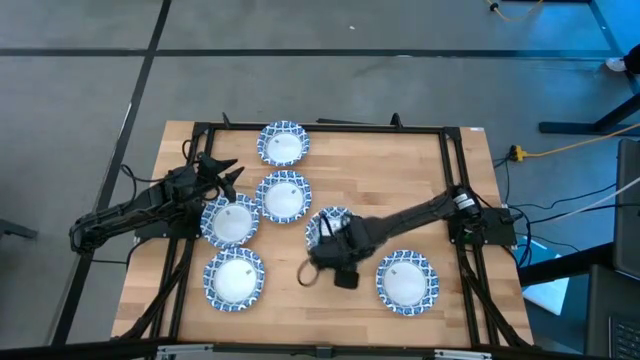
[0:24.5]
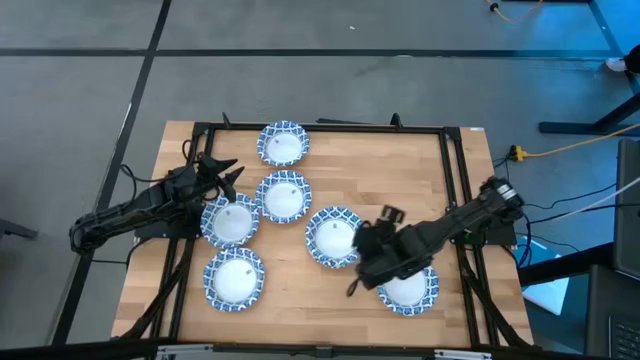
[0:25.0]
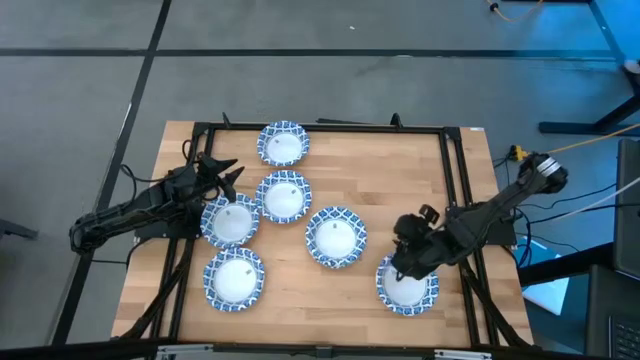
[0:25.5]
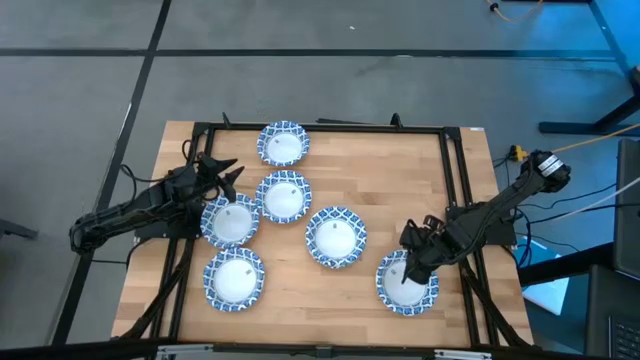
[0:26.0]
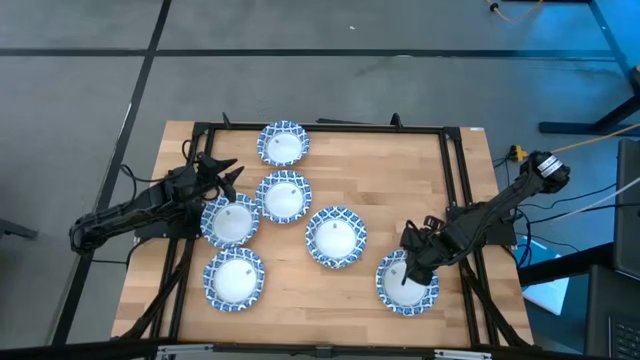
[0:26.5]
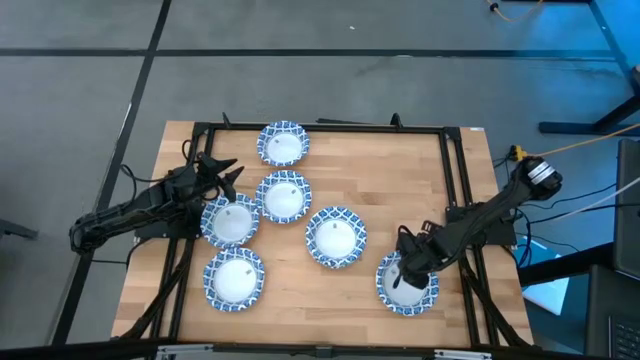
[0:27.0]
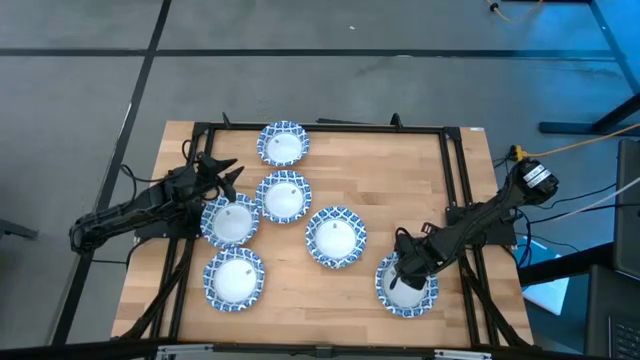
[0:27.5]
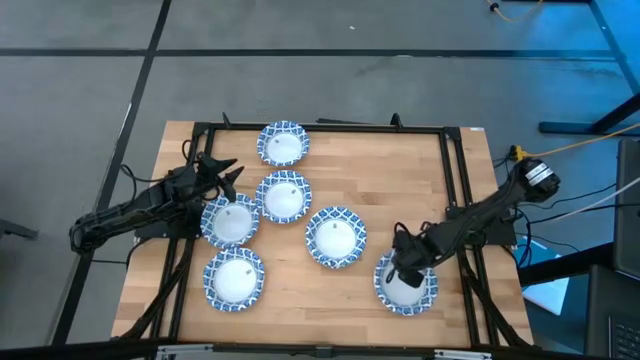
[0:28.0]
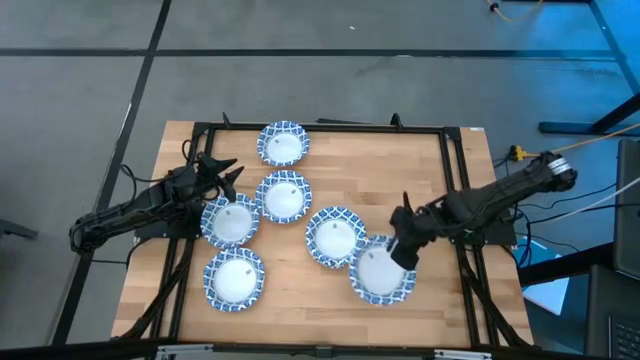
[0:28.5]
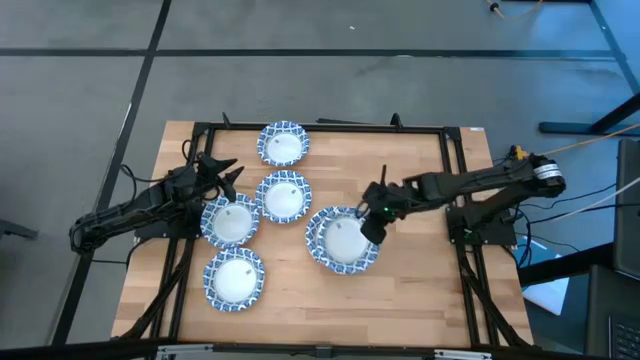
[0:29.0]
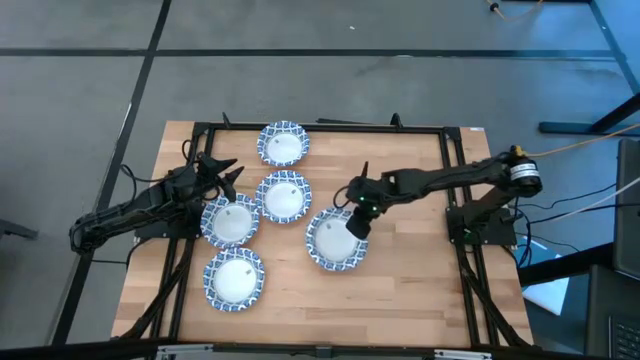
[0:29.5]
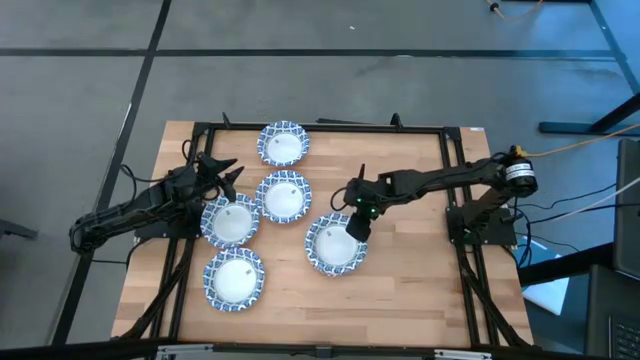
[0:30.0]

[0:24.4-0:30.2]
Task: Nest bowls inside each other
Stack the white bowl on top of the other white bowl

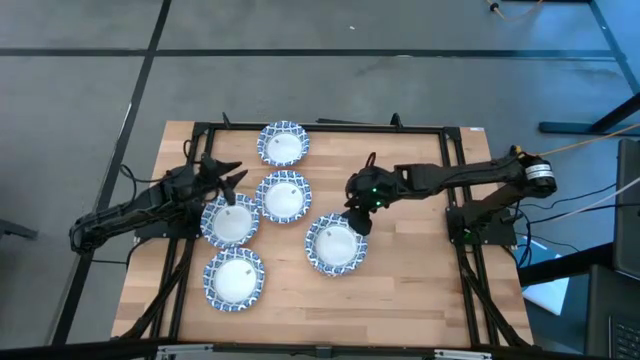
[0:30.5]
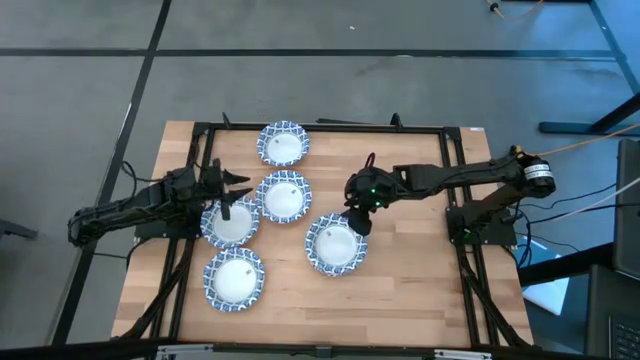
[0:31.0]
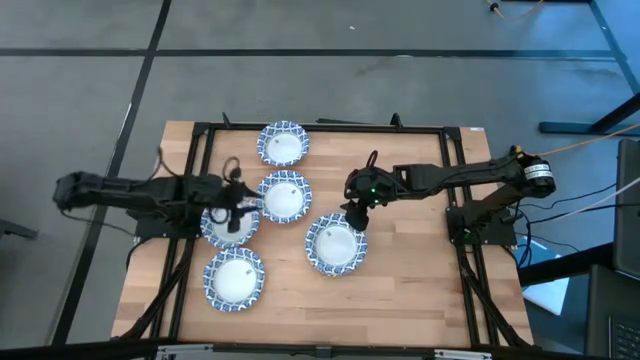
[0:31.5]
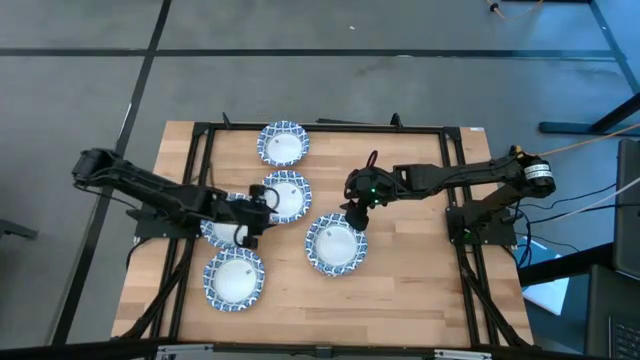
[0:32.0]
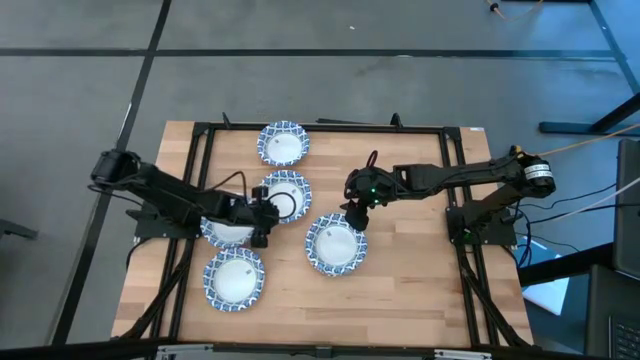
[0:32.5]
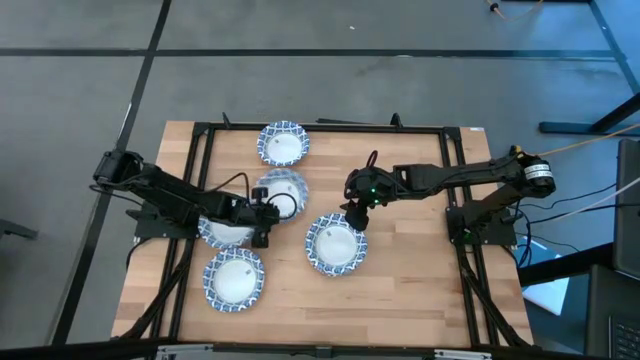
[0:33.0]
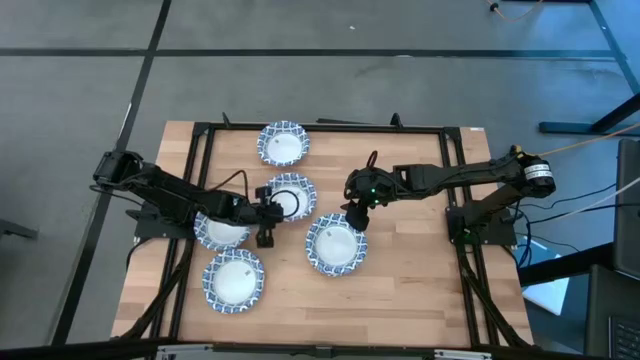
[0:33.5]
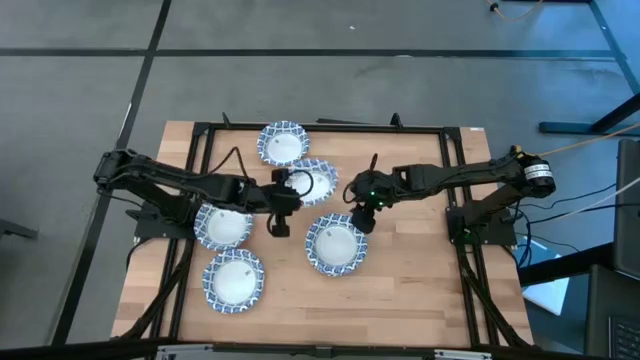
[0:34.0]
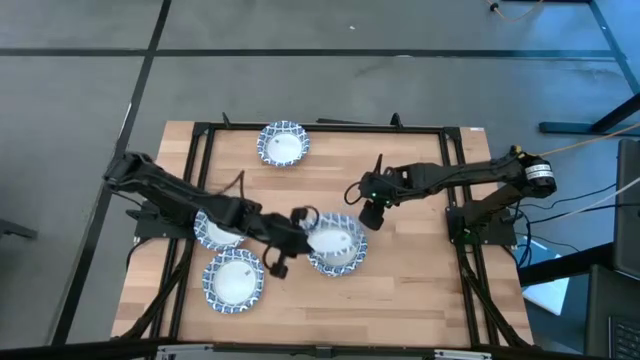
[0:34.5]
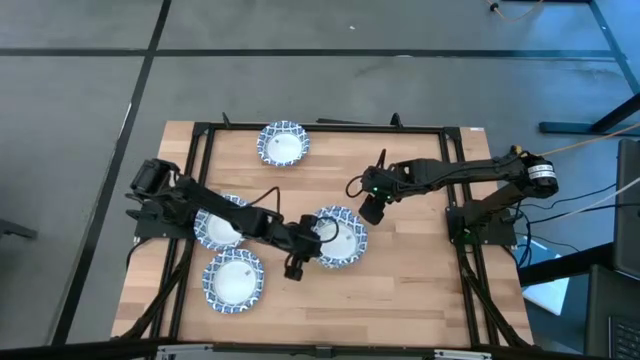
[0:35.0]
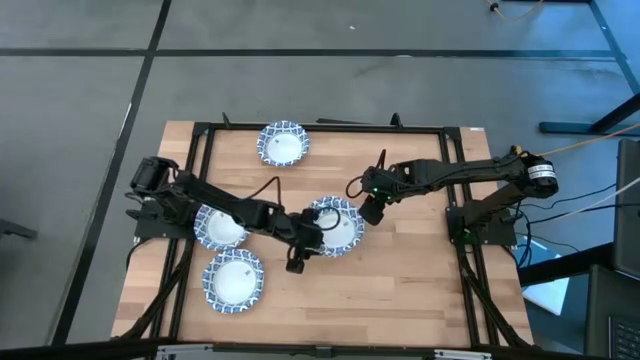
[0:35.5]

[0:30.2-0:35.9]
Stack the white bowl on top of the other white bowl

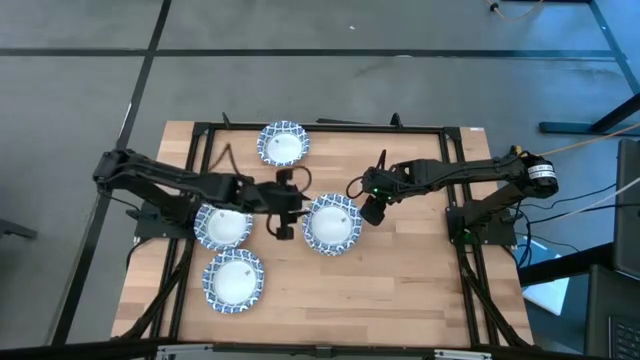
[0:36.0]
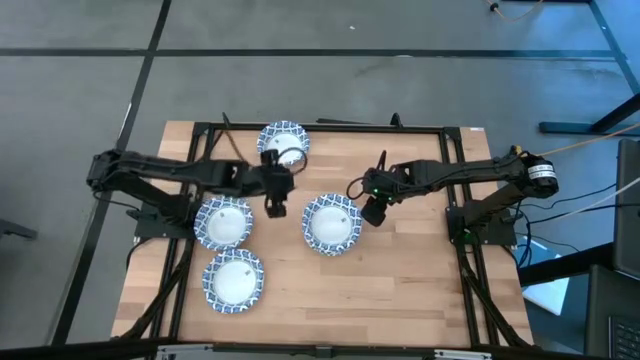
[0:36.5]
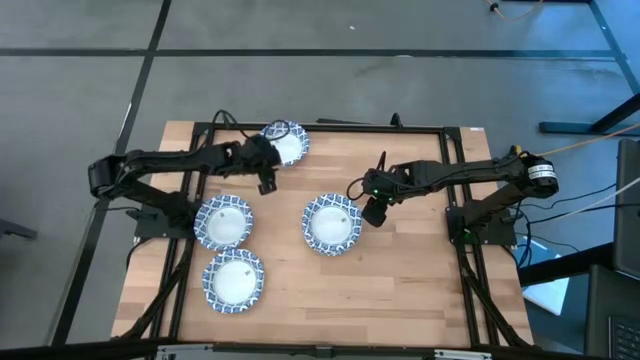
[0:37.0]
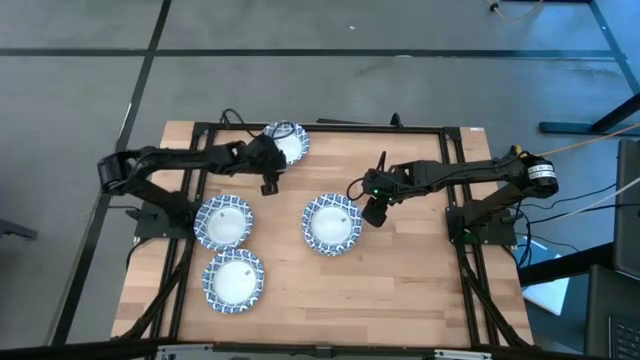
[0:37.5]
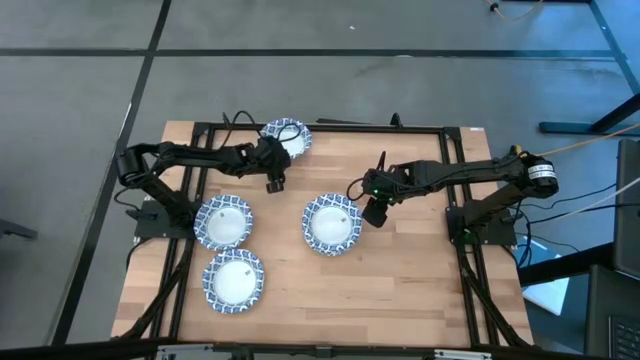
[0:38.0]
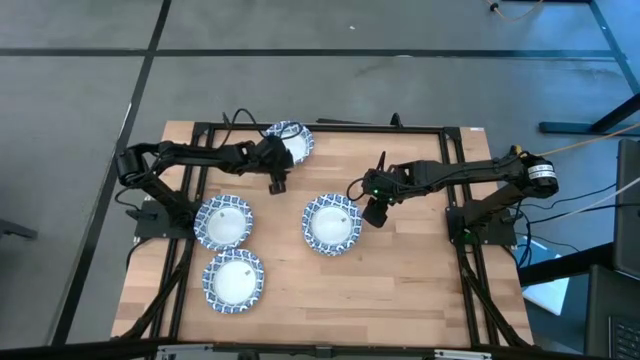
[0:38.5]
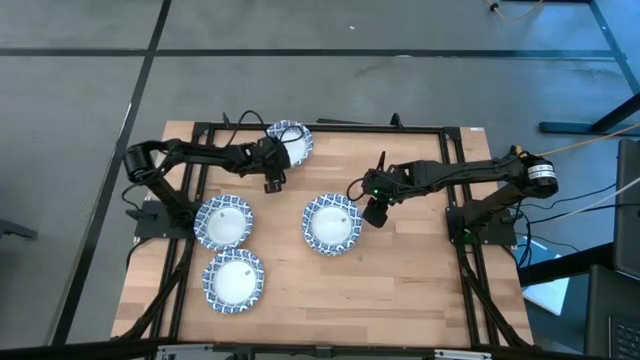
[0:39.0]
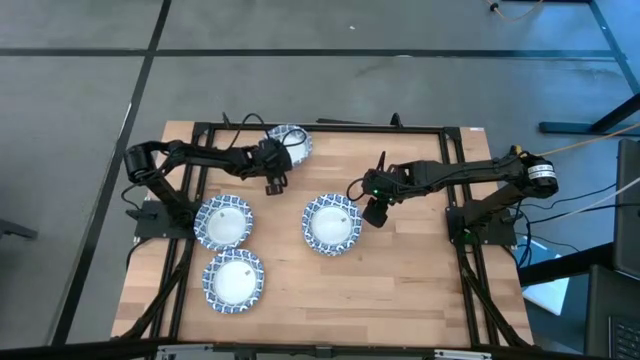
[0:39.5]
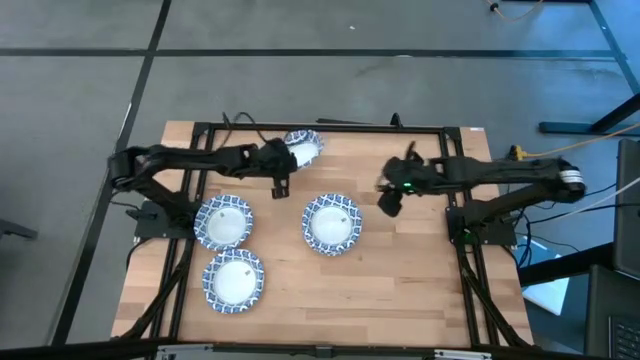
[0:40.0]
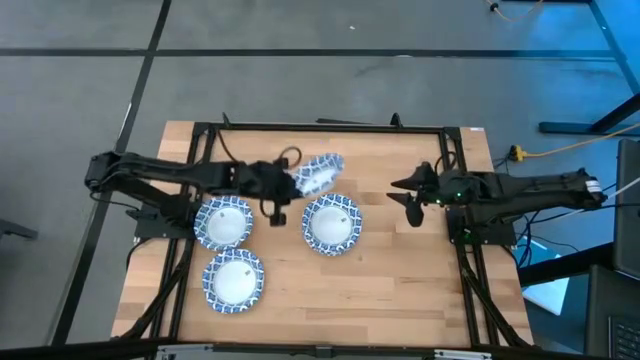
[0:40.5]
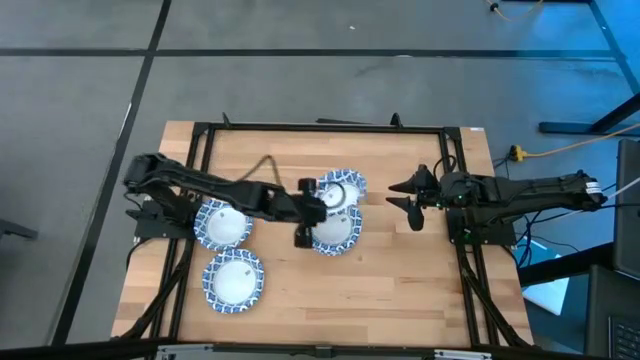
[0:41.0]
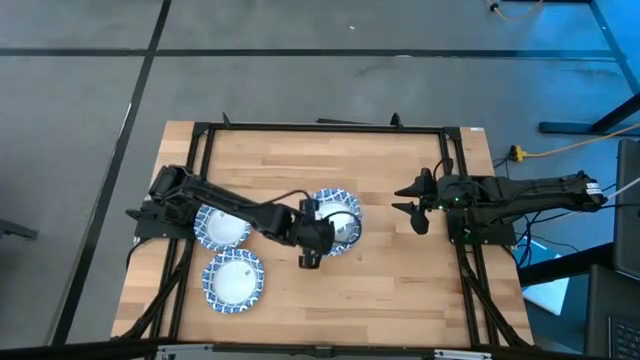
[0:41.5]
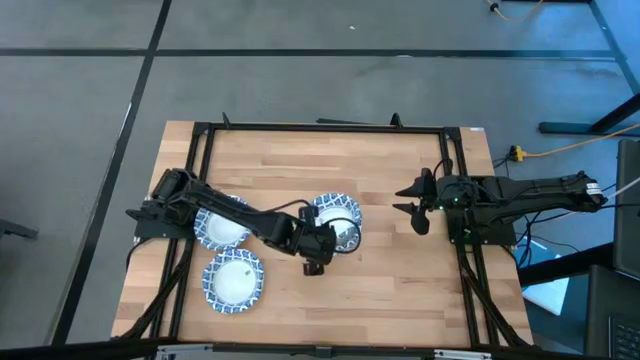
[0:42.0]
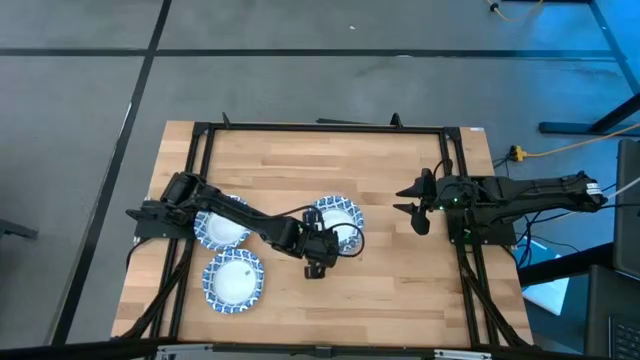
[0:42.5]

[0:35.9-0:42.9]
Stack the white bowl on top of the other white bowl

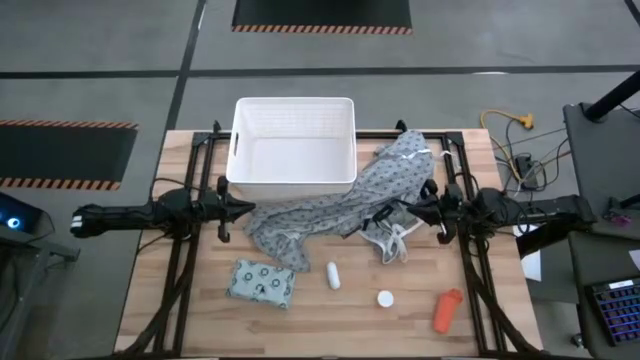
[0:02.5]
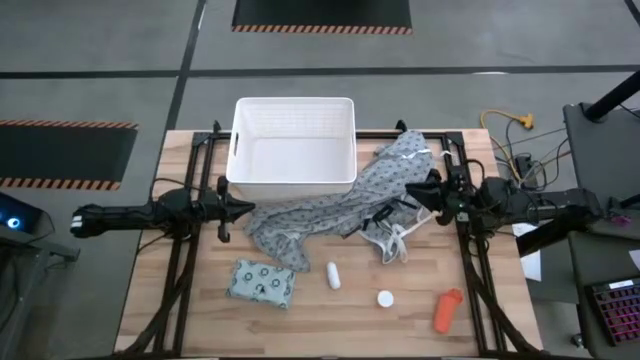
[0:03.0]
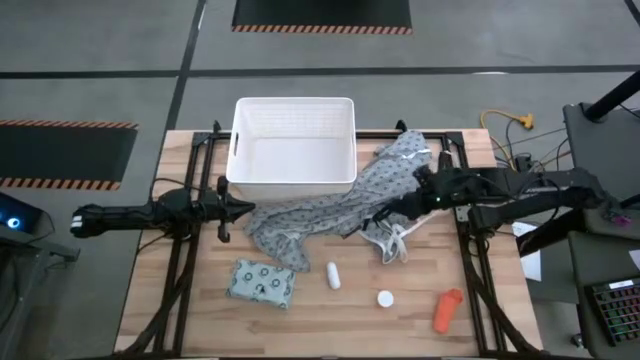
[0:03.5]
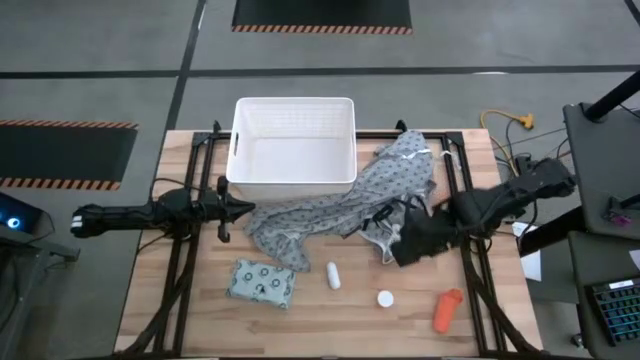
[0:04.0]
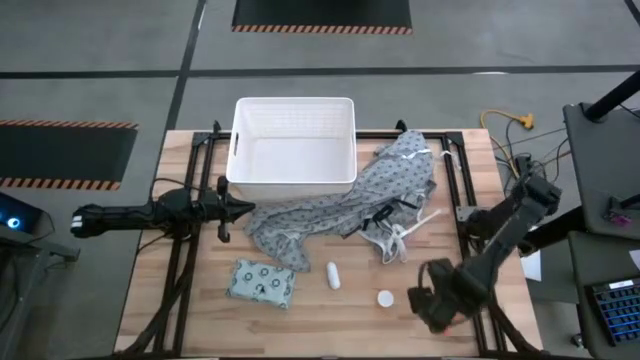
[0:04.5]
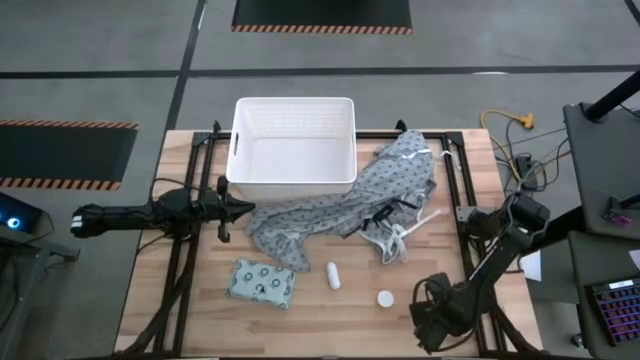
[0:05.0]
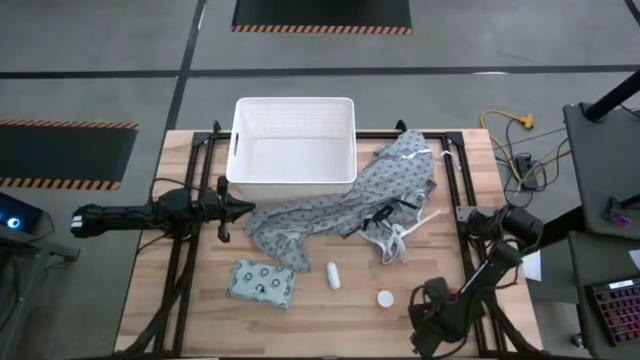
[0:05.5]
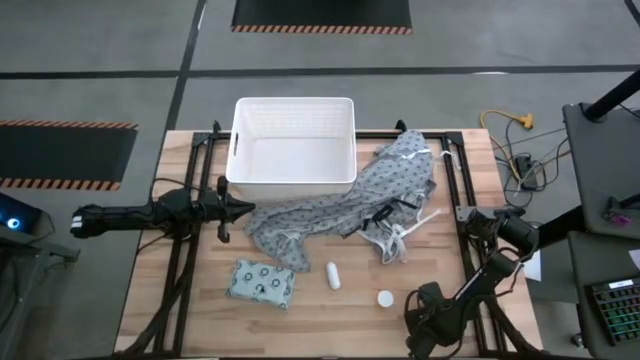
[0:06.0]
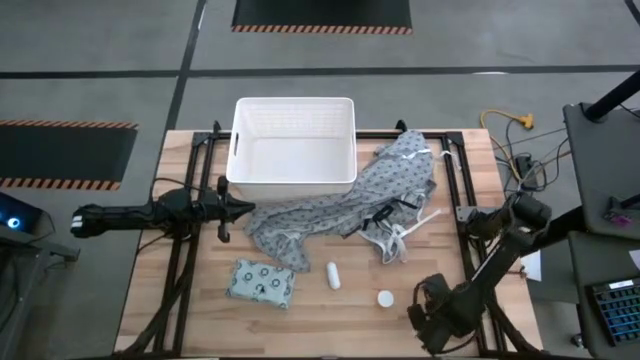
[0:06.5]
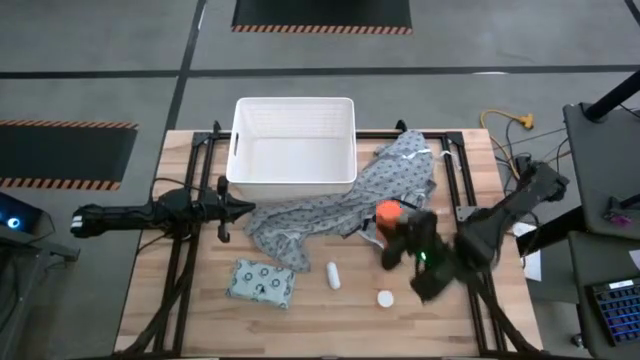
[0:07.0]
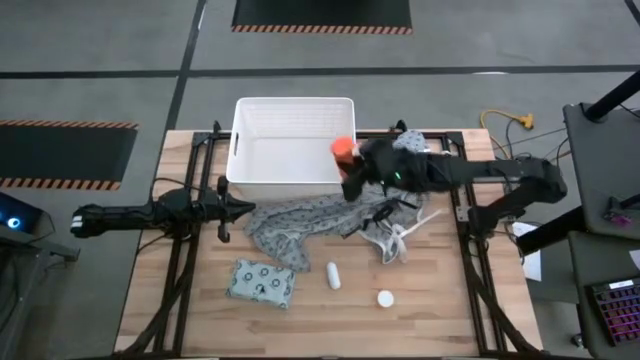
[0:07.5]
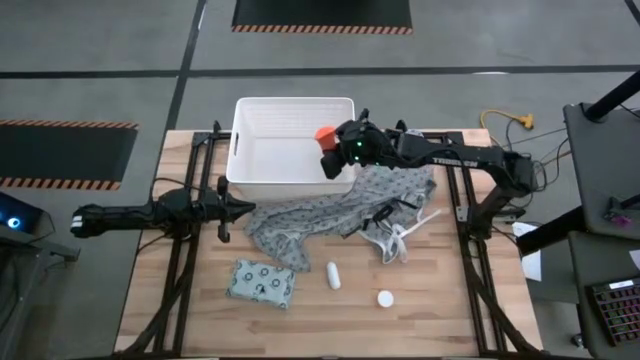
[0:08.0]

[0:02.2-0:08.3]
Task: Pick & place medical supplies in basket/bin
Put the orange bandage into the white bin
